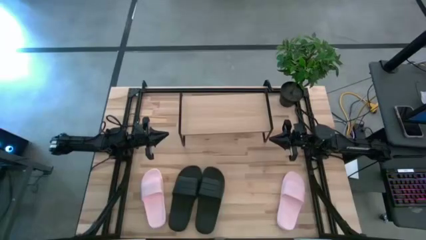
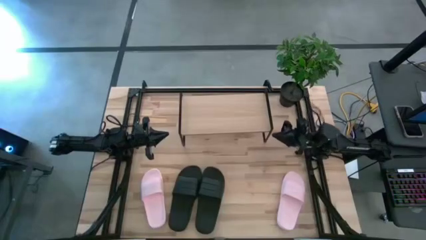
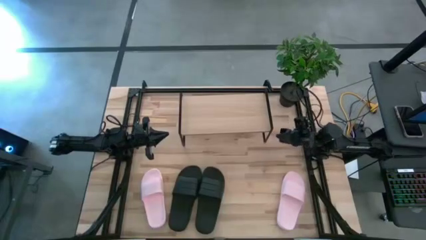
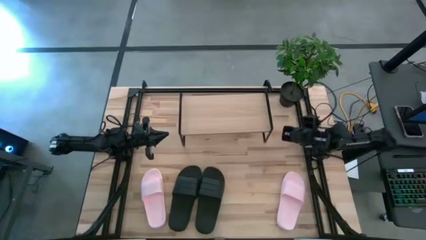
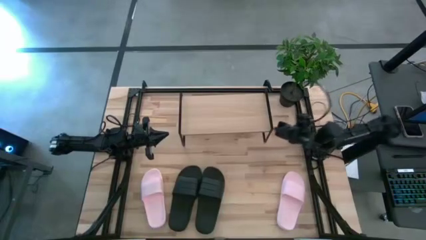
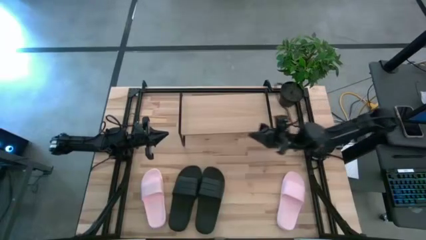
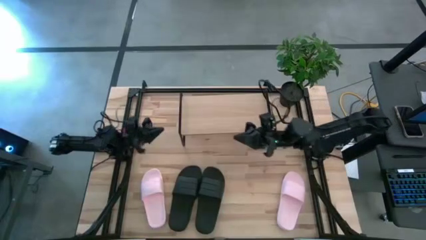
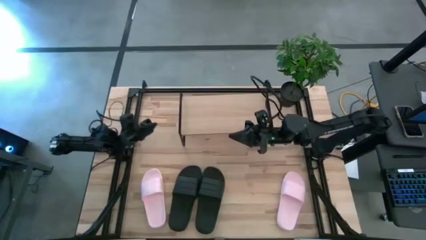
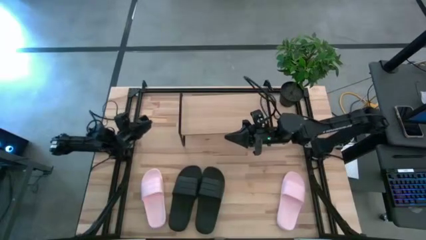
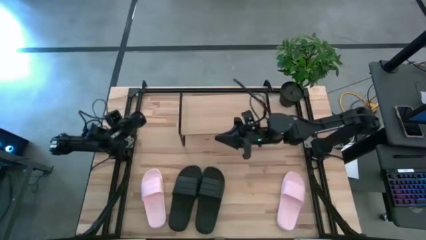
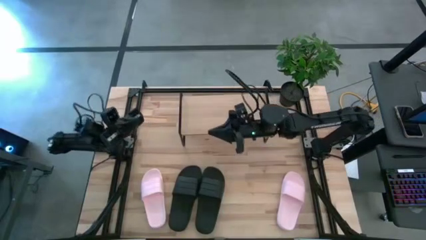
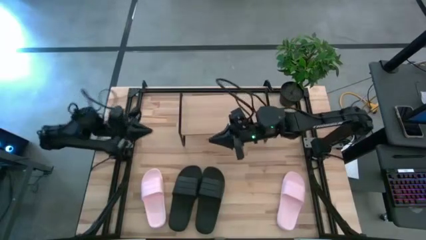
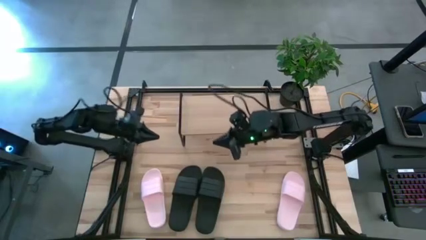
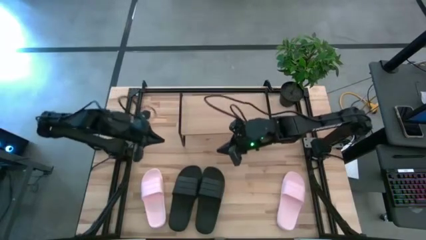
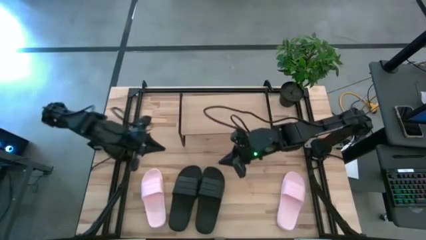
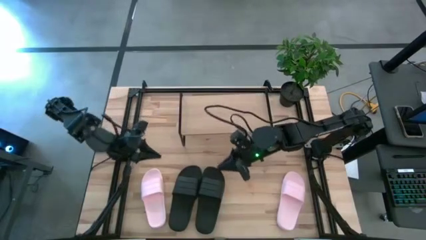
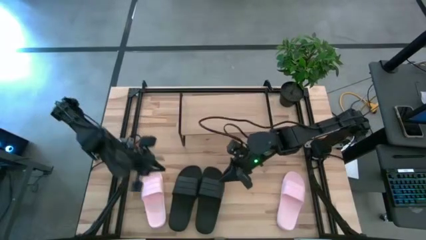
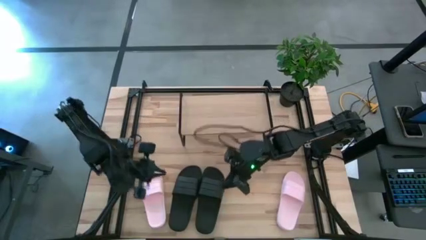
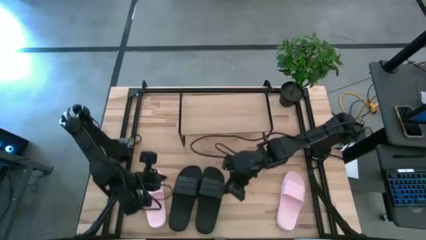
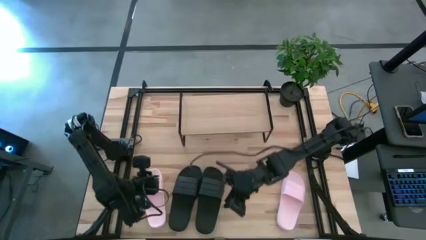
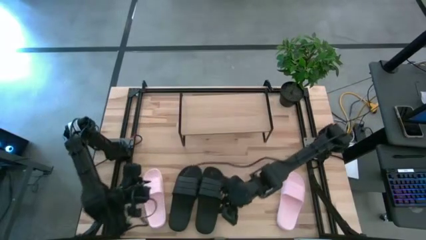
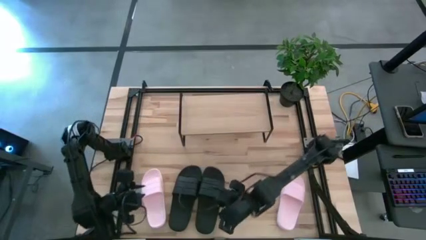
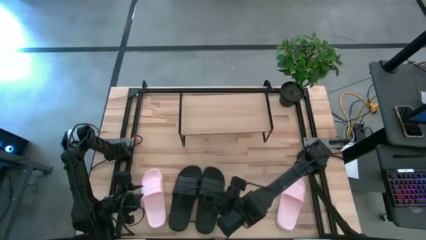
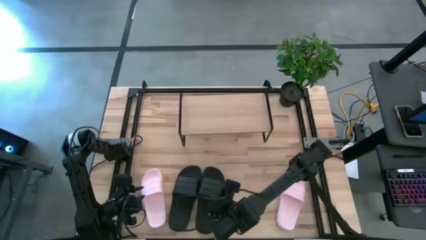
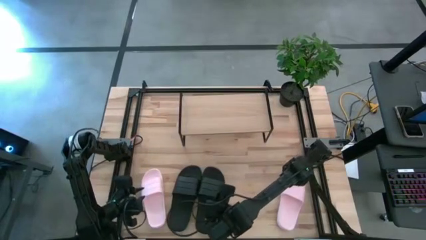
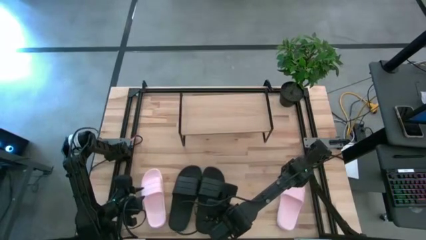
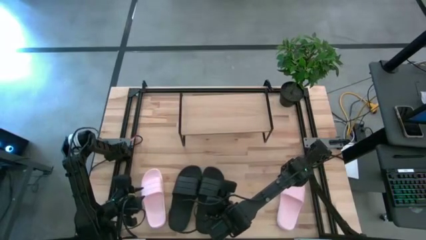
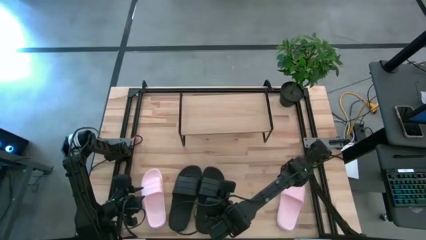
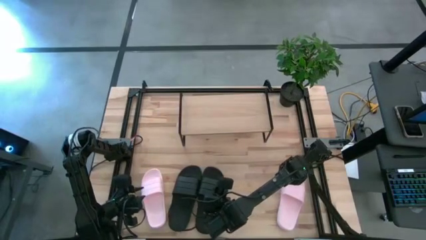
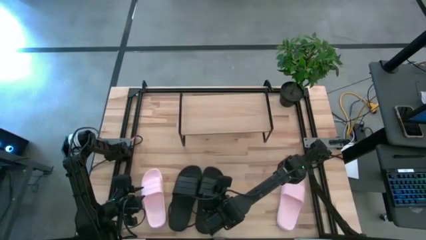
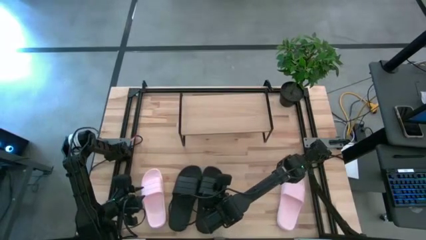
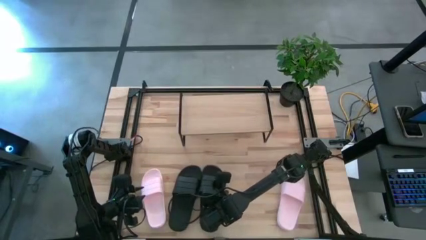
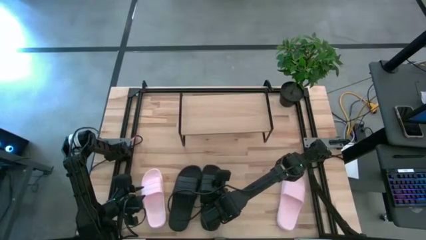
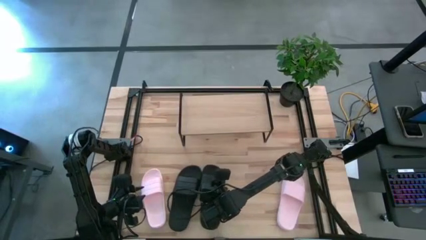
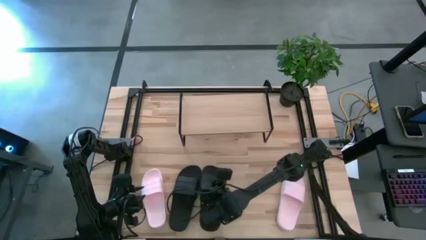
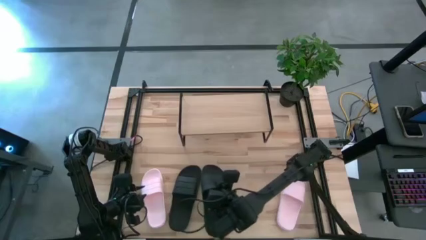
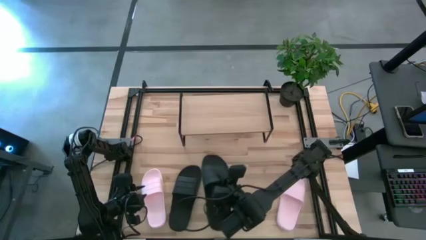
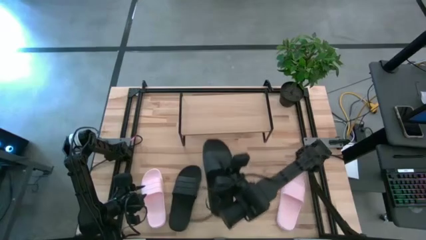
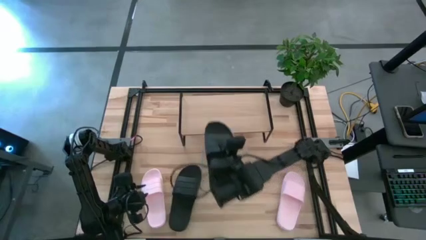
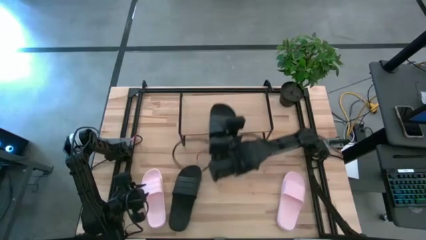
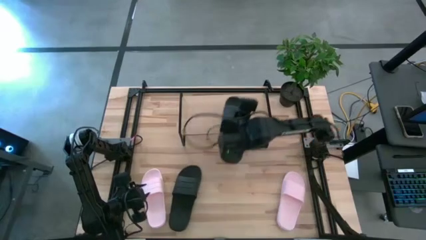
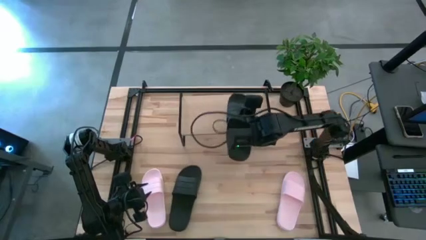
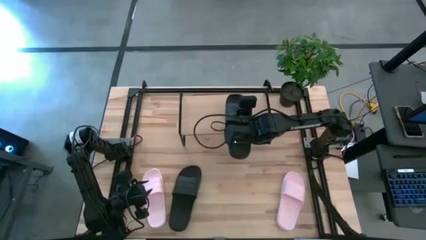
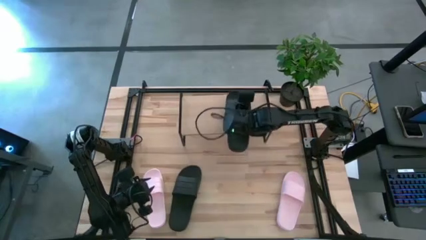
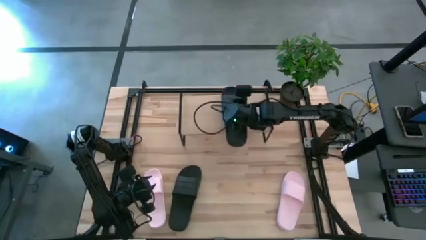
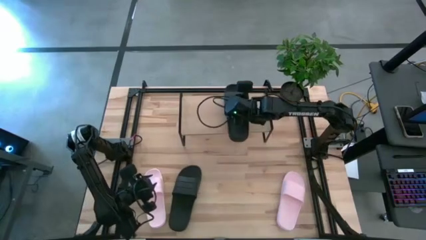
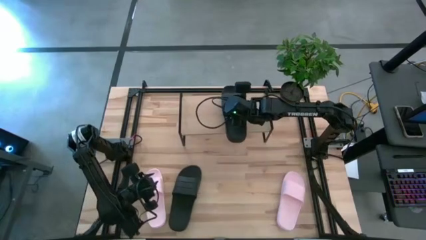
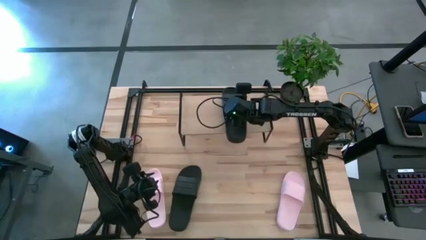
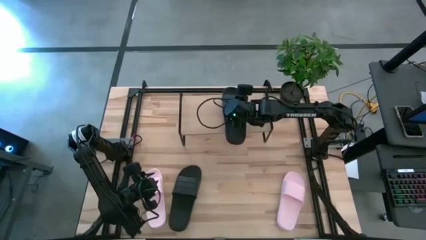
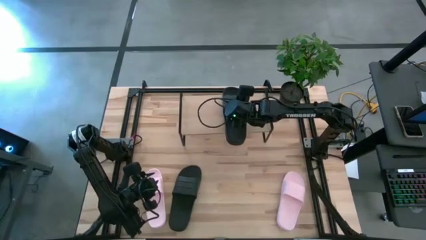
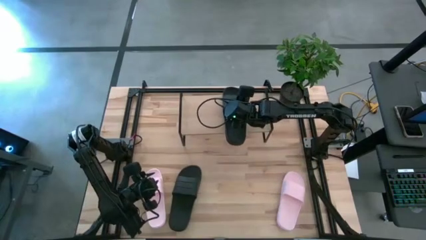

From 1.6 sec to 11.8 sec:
Task: Pick and place slides into the shelf
Put the right black slide on the shelf

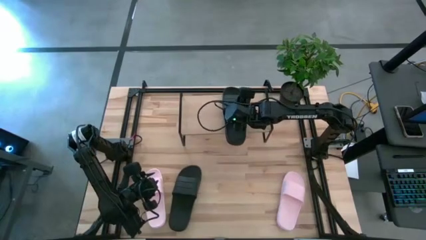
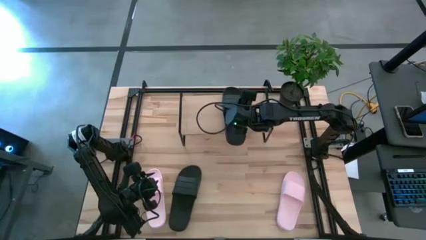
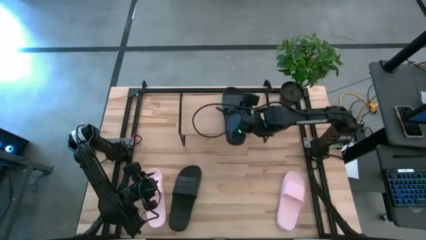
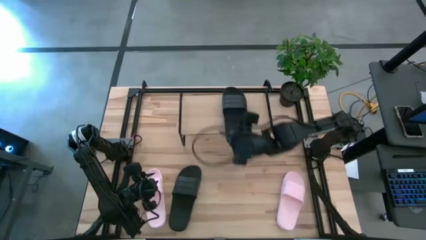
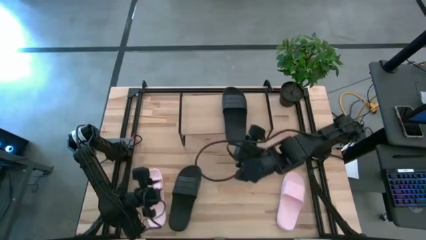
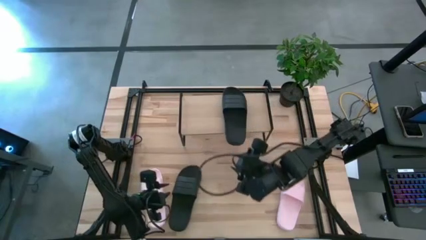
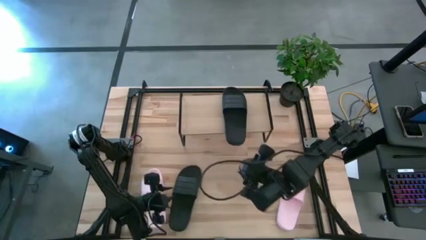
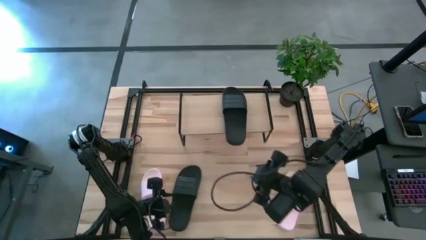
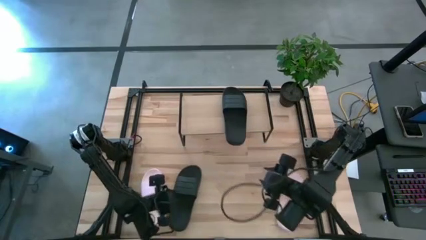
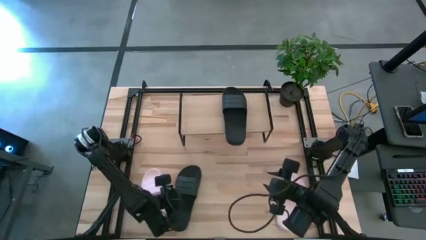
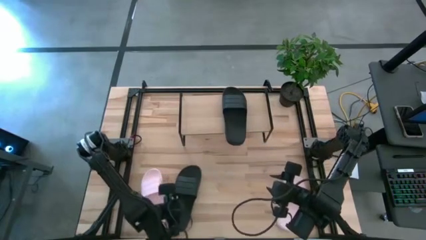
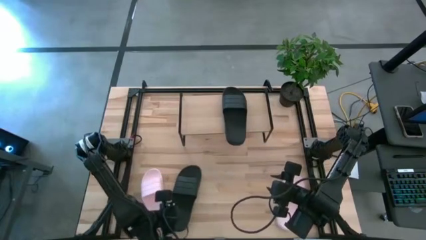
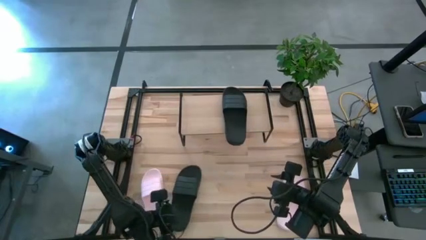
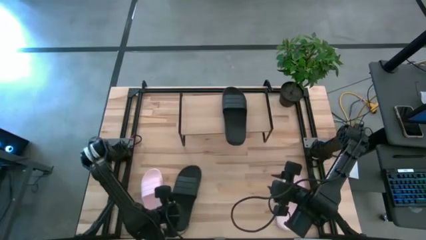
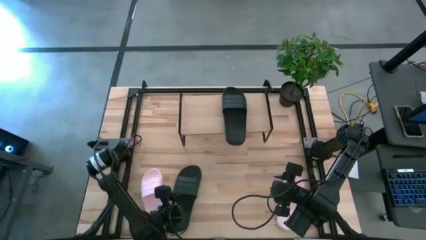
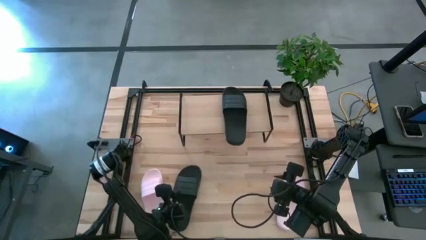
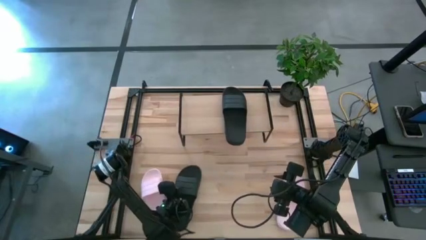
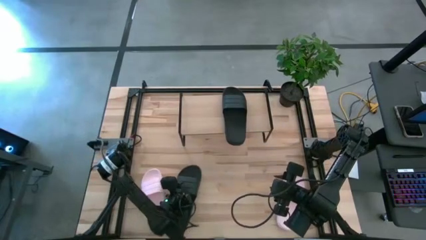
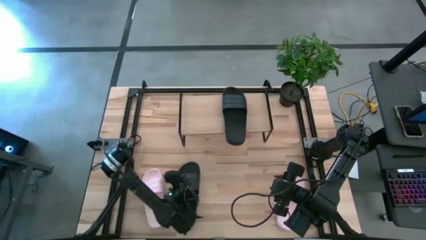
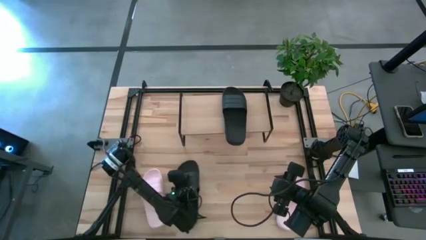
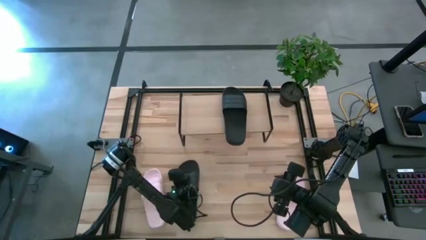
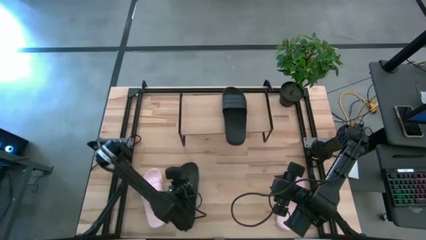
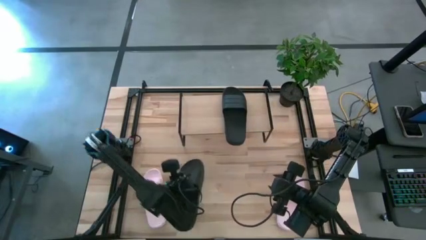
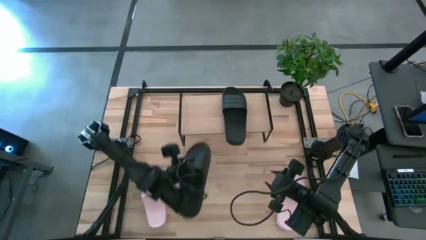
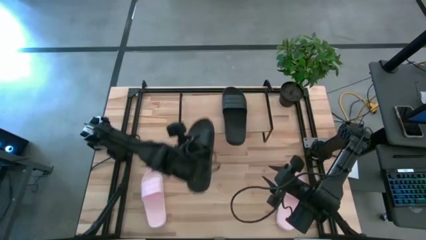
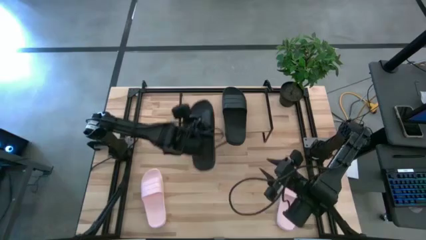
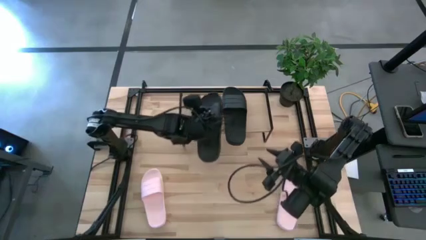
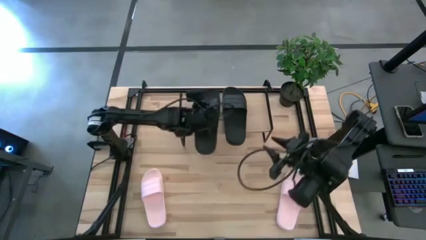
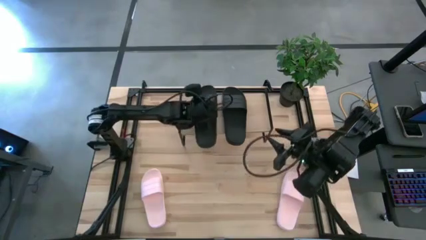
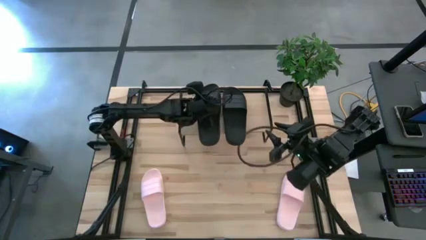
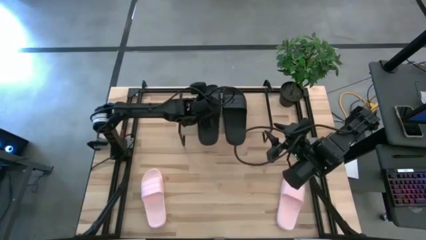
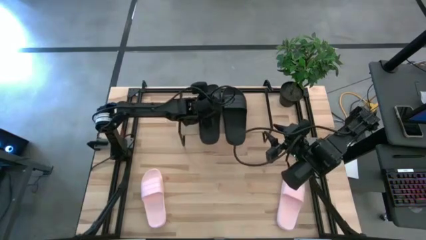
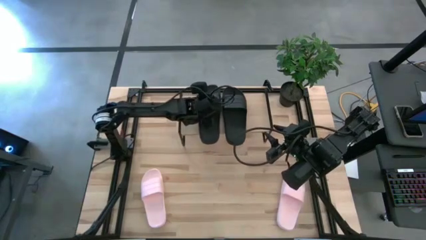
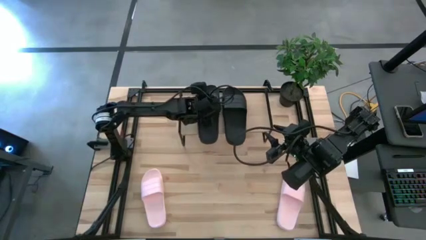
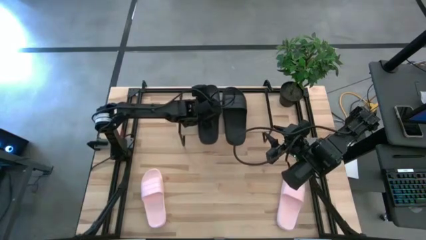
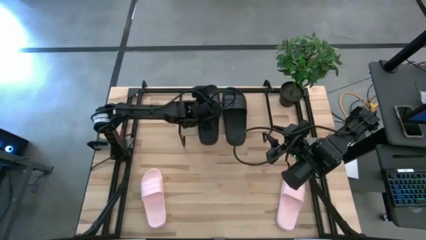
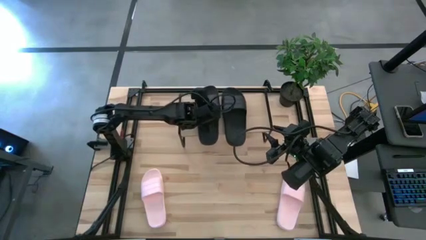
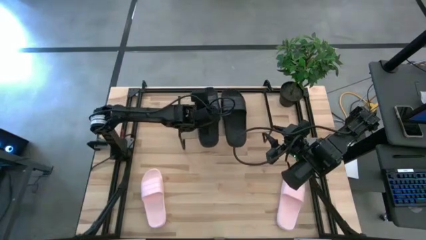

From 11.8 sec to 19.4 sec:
Put the black slide on the shelf
